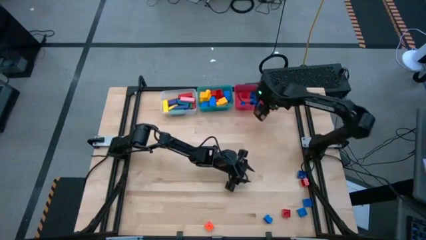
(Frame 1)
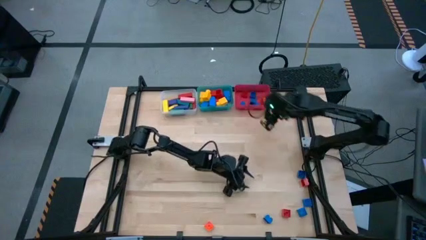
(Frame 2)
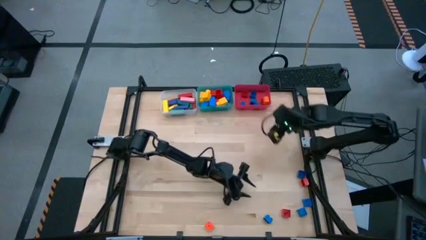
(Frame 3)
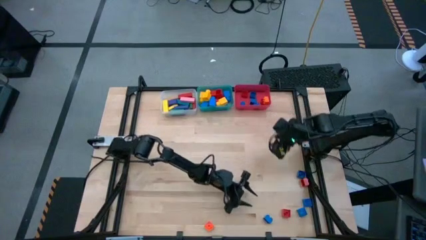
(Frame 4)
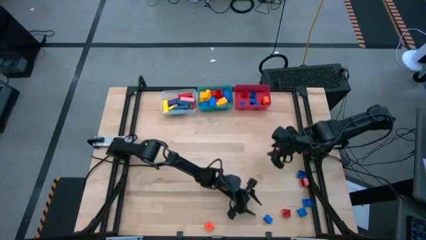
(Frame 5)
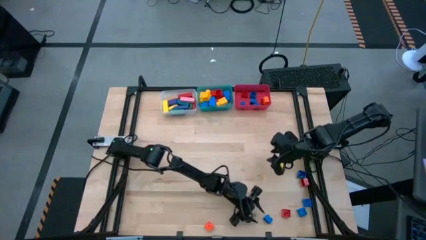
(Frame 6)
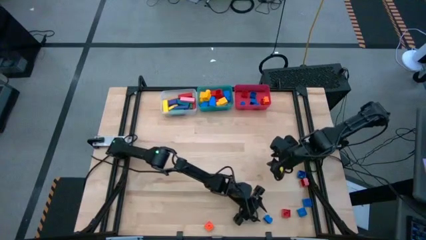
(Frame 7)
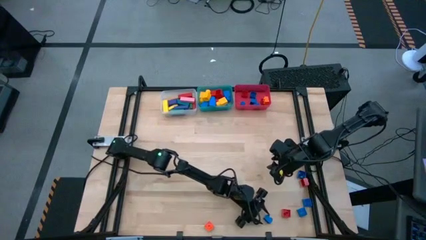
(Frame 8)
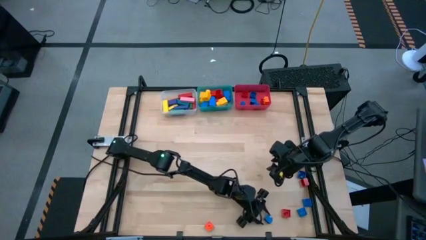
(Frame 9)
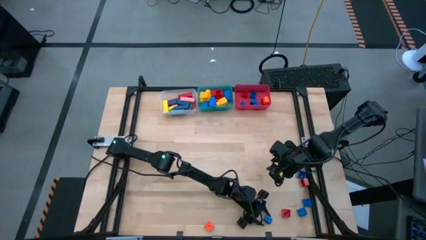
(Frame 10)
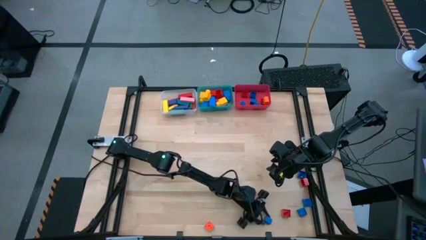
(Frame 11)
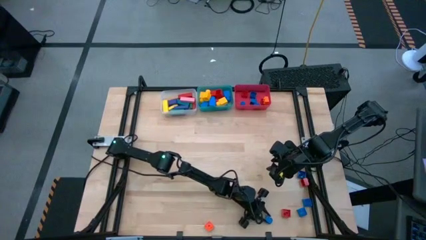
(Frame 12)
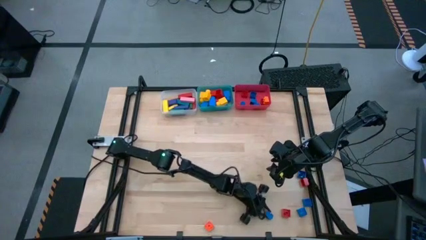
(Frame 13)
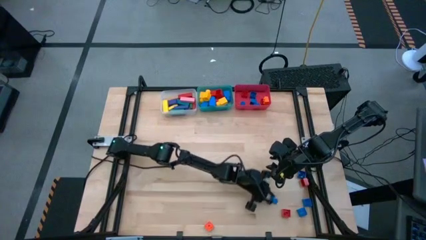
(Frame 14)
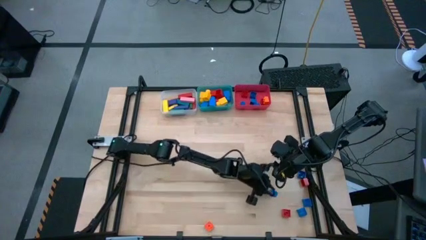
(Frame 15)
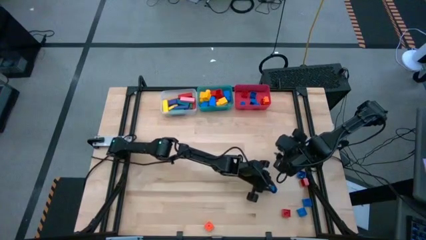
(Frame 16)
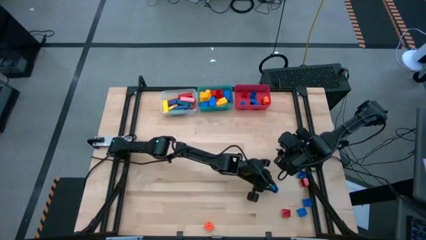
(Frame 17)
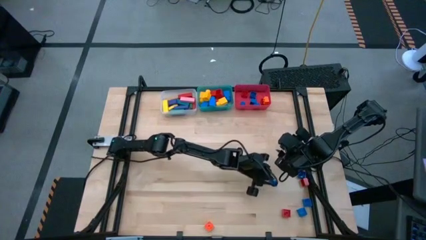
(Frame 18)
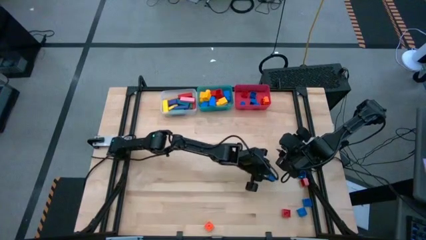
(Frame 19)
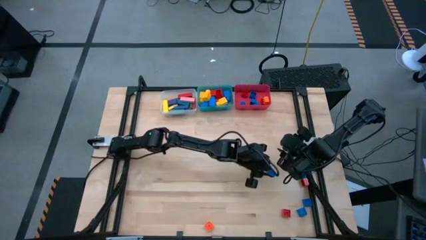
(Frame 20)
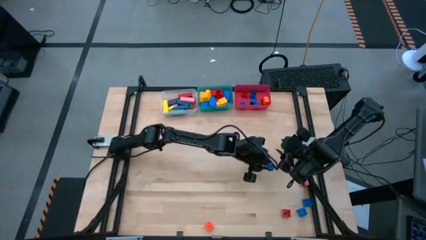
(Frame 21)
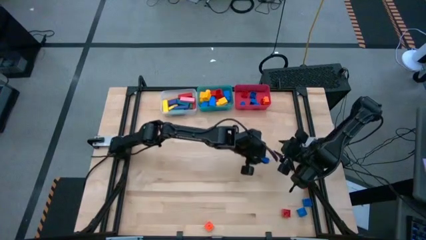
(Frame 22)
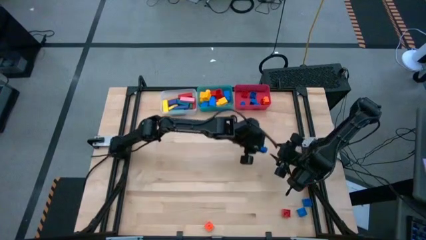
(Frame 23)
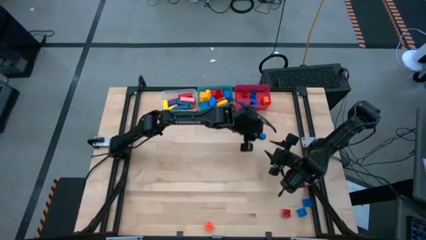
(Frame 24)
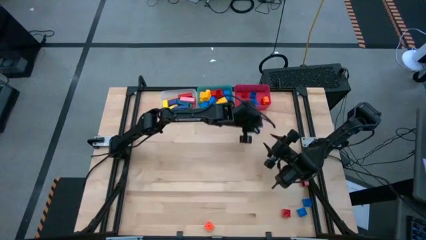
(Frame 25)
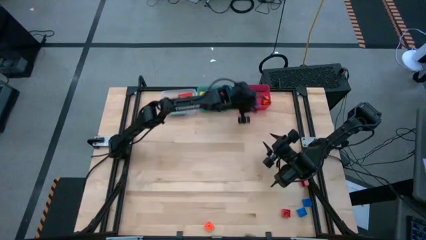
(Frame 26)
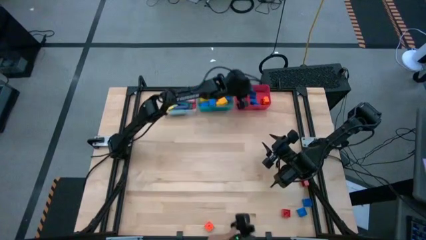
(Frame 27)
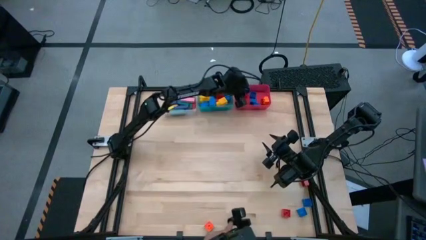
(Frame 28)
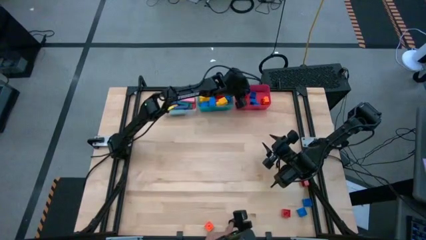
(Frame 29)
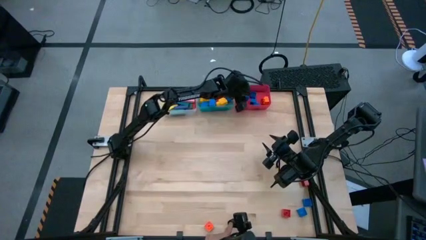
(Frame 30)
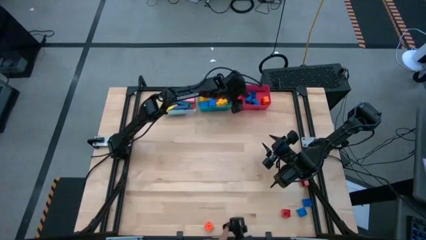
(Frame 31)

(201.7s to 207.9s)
Task: Sort blocks by size
Put the blue 4 stud game piece into the red bin

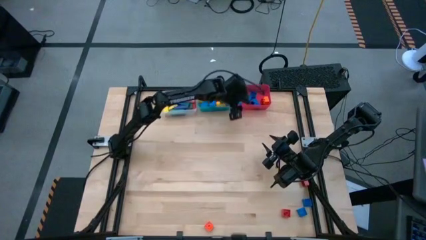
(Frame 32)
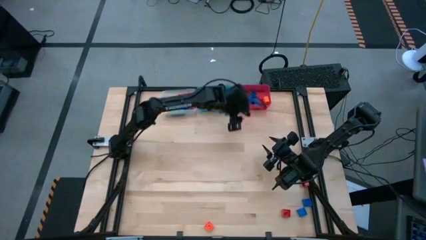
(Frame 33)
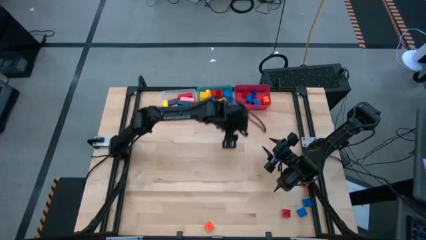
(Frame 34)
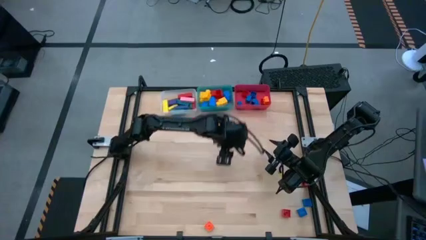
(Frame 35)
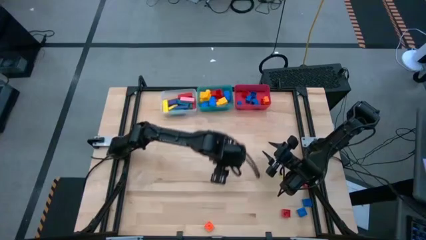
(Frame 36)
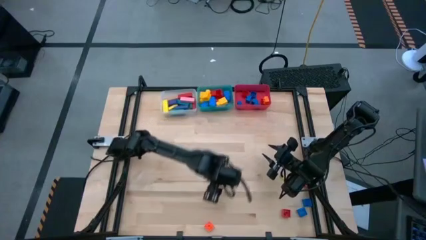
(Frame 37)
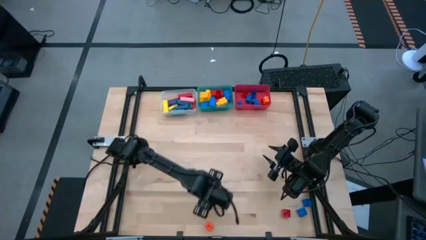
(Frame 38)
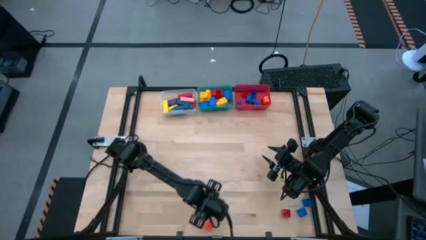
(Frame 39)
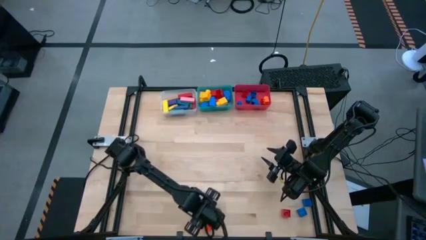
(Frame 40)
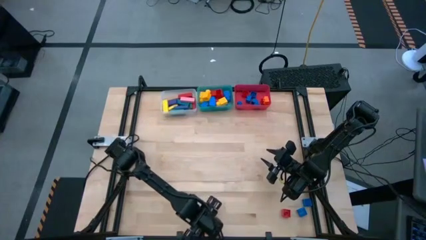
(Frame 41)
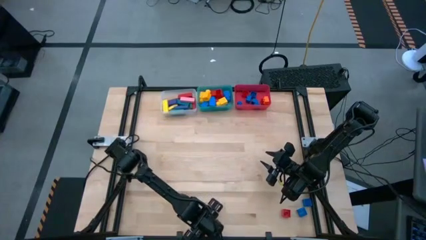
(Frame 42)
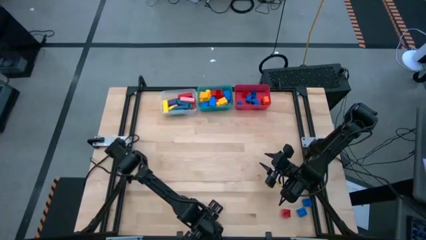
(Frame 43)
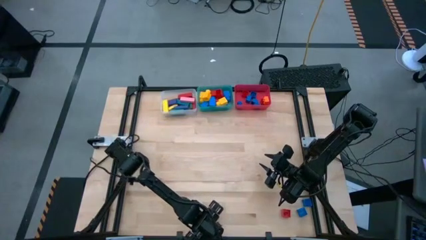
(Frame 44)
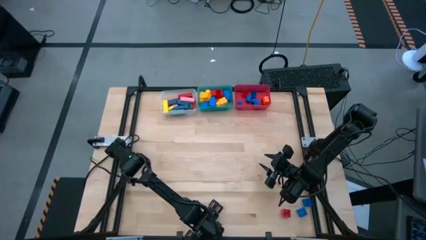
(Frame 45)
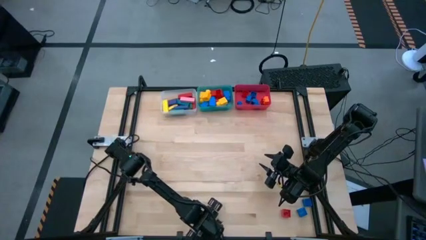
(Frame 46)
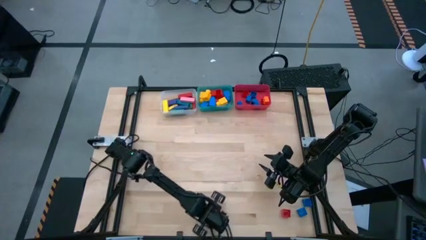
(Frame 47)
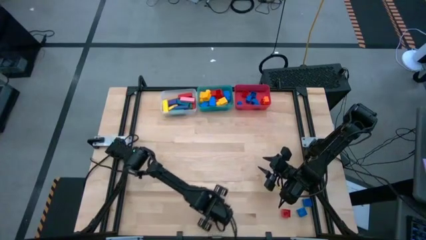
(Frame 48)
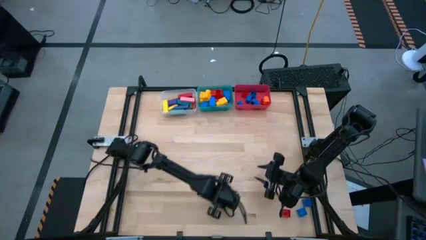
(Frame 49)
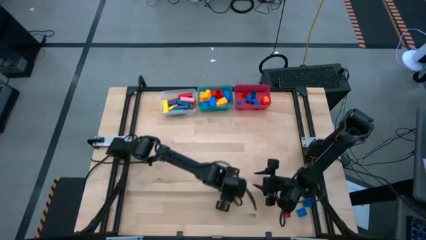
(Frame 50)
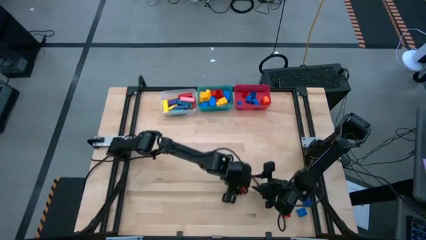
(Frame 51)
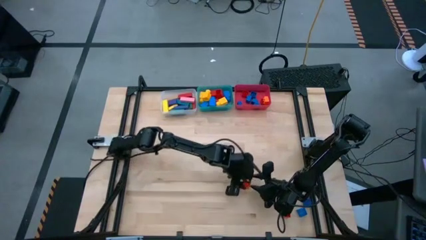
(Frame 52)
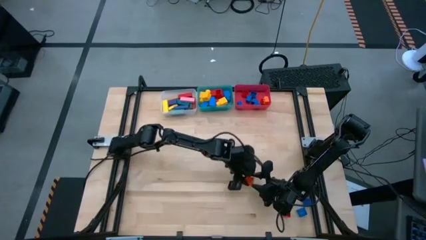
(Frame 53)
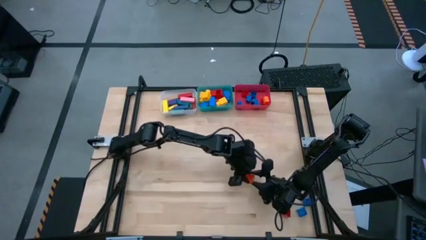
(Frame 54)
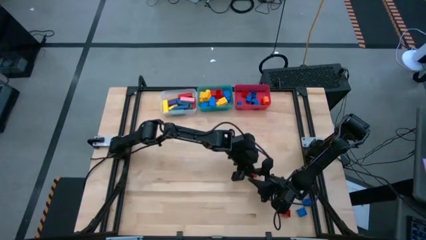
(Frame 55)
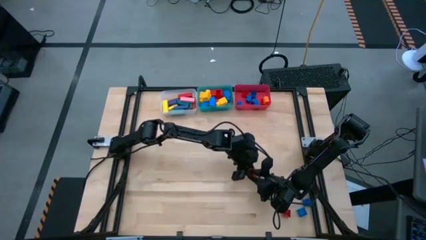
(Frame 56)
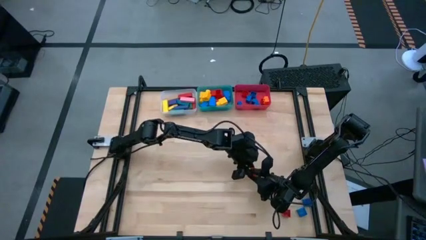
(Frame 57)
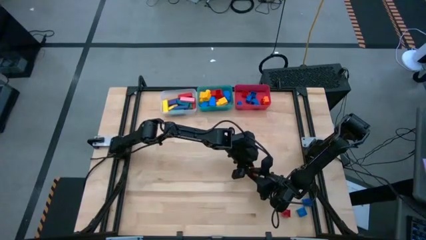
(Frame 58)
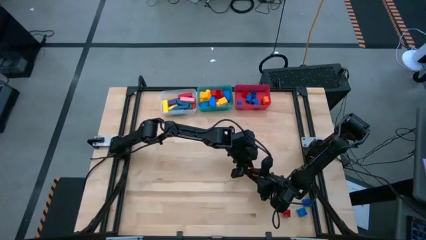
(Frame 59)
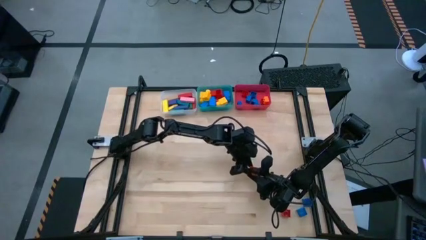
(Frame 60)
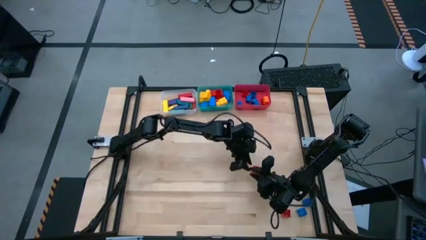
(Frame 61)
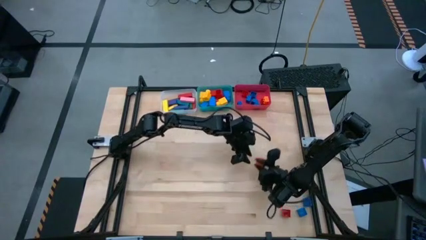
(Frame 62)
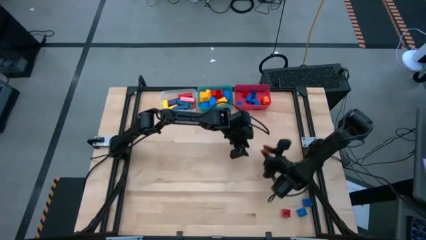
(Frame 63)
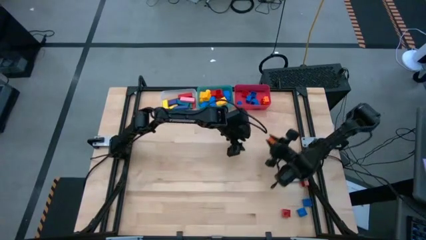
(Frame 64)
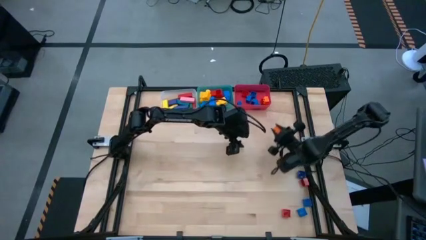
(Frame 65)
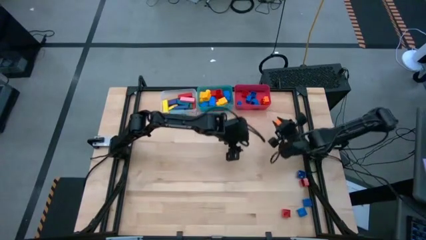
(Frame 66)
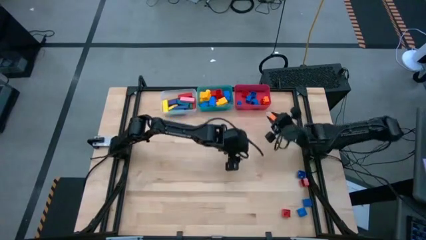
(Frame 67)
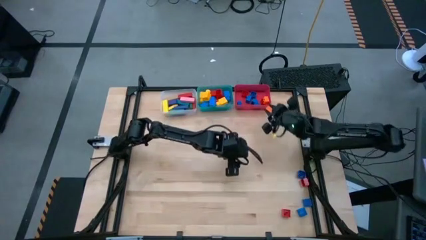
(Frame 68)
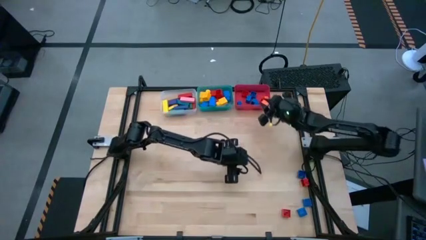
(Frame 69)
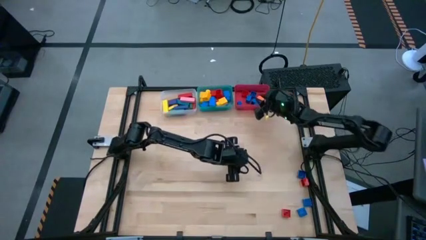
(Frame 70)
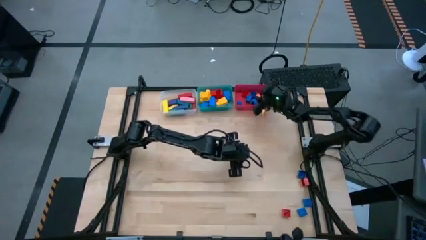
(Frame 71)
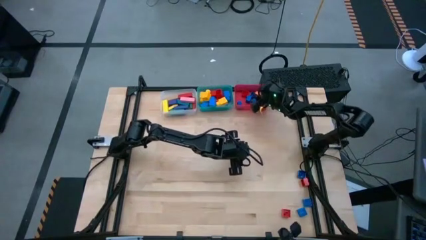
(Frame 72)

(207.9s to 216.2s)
Put the orange 4 stud game piece into the red bin
